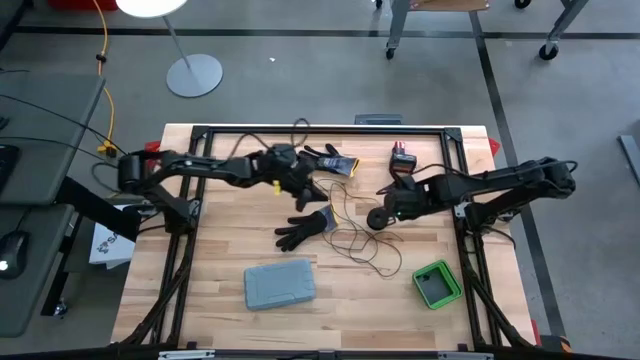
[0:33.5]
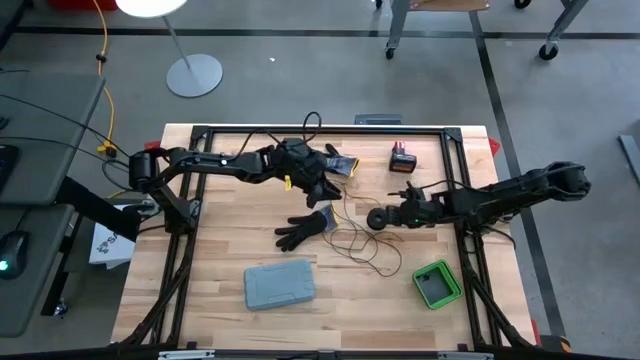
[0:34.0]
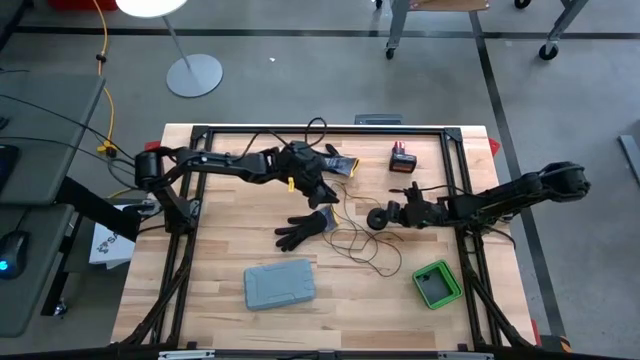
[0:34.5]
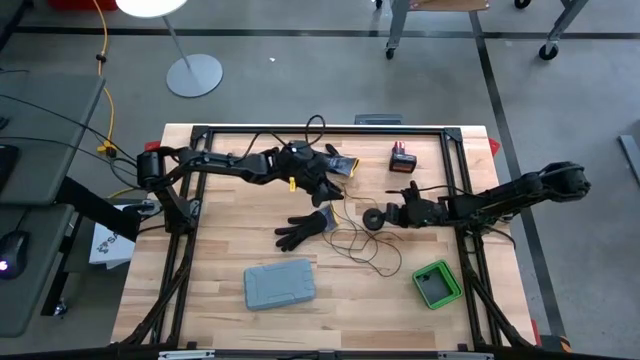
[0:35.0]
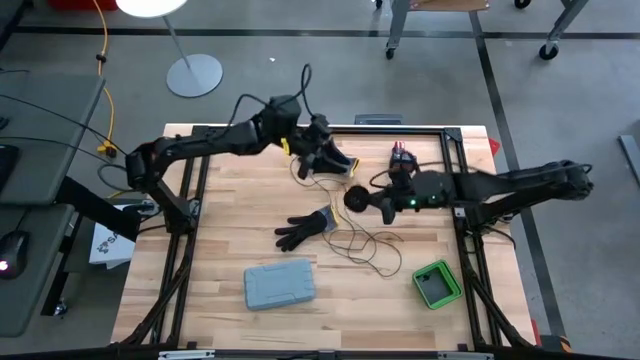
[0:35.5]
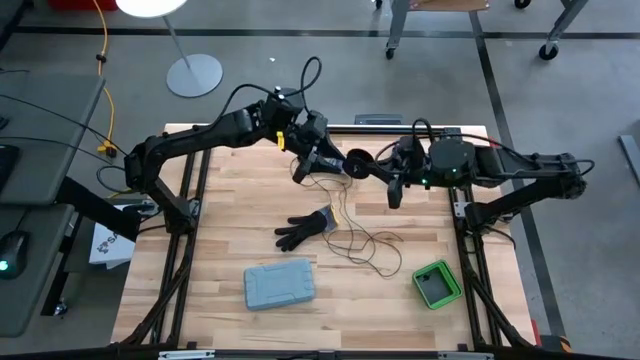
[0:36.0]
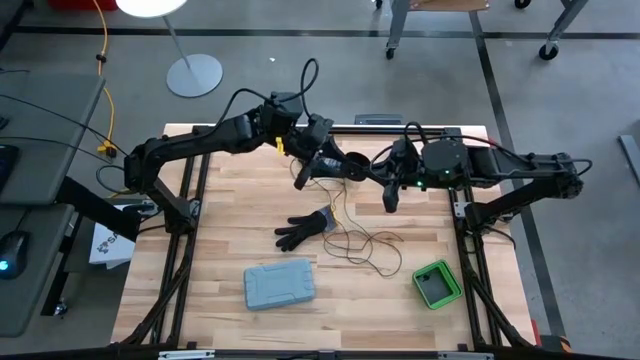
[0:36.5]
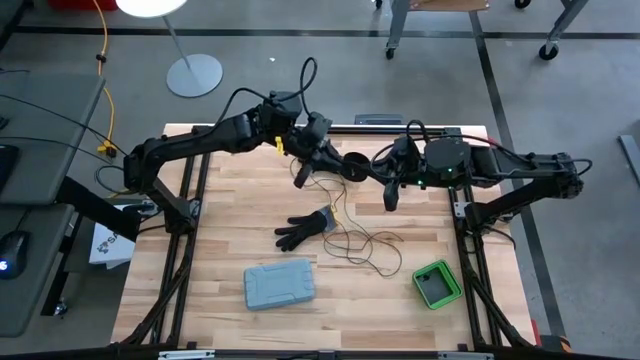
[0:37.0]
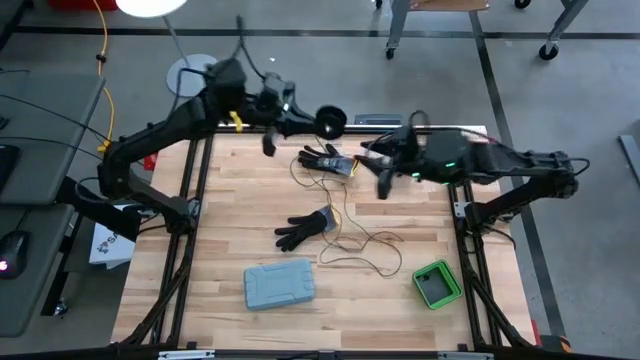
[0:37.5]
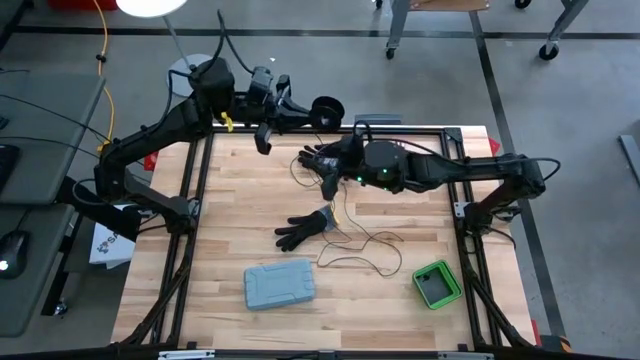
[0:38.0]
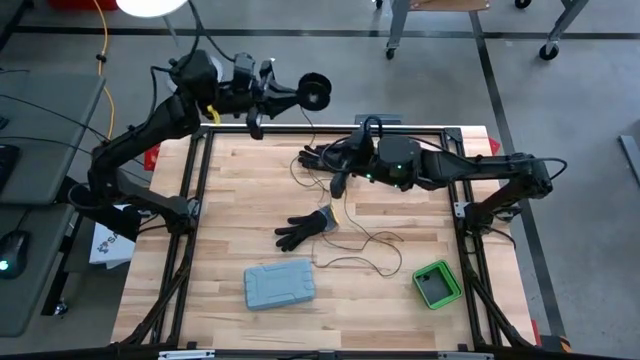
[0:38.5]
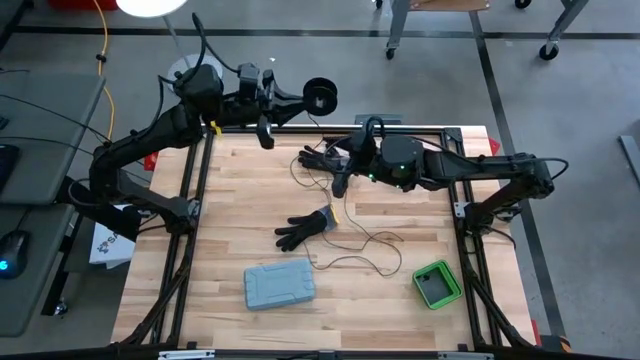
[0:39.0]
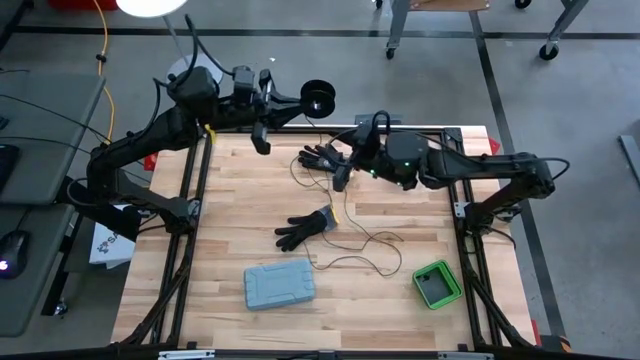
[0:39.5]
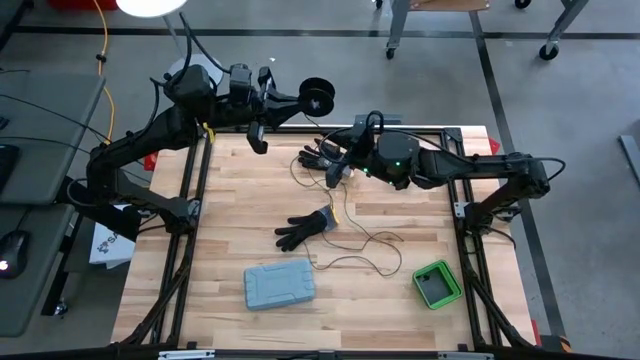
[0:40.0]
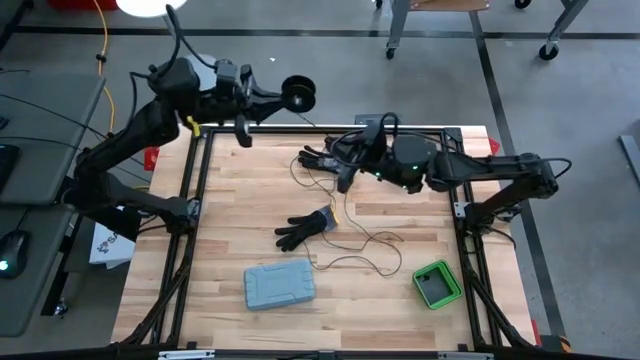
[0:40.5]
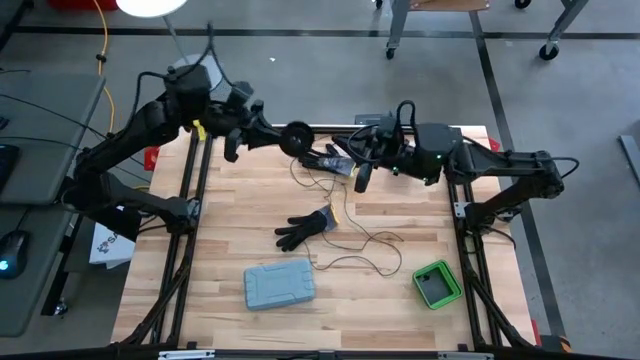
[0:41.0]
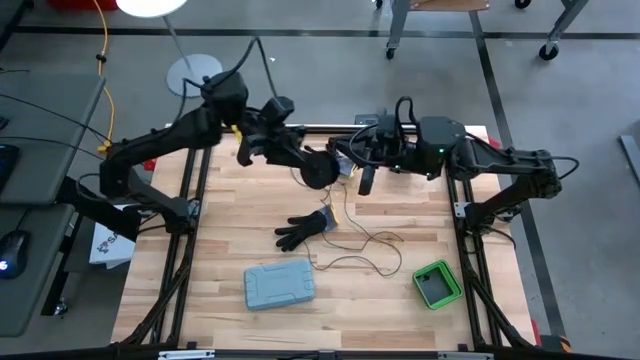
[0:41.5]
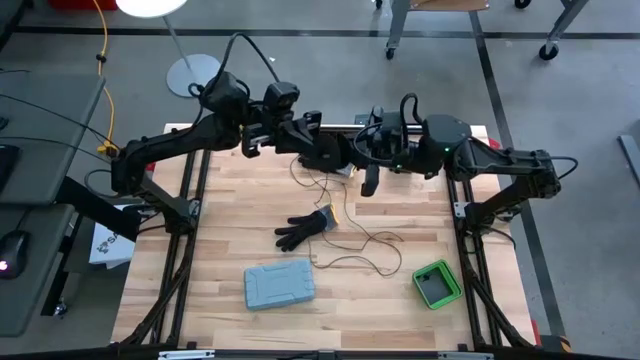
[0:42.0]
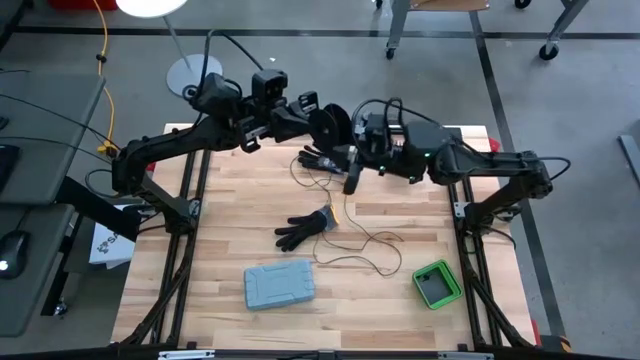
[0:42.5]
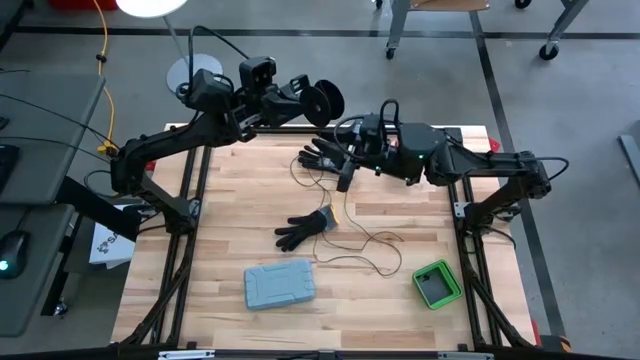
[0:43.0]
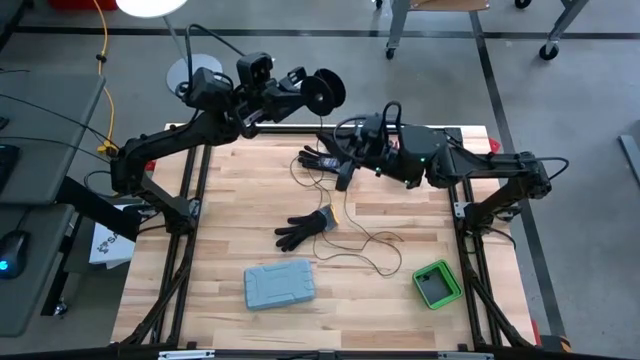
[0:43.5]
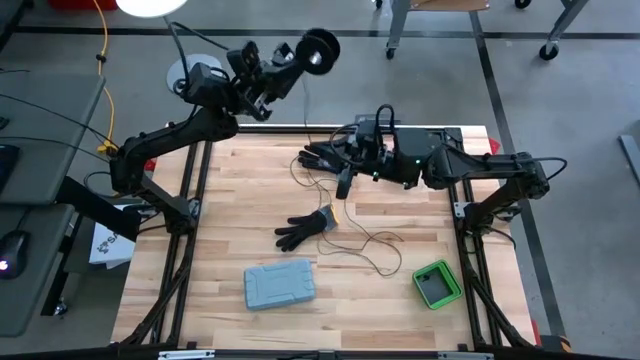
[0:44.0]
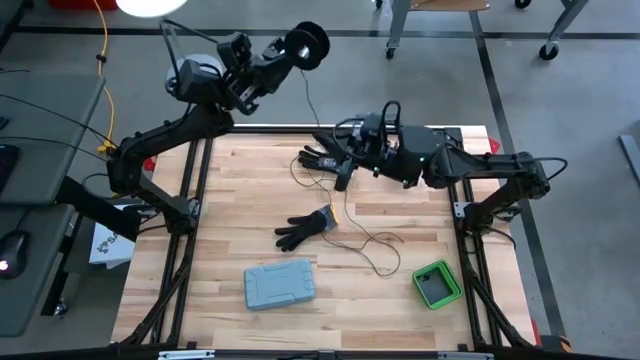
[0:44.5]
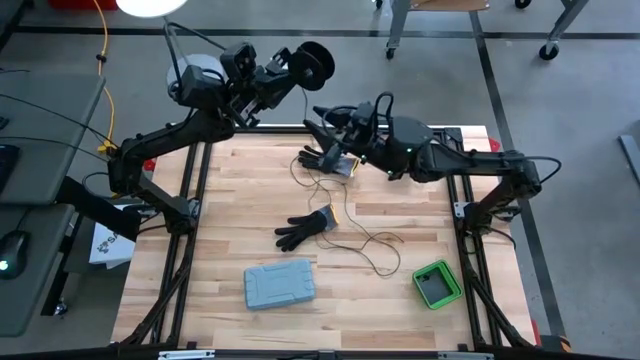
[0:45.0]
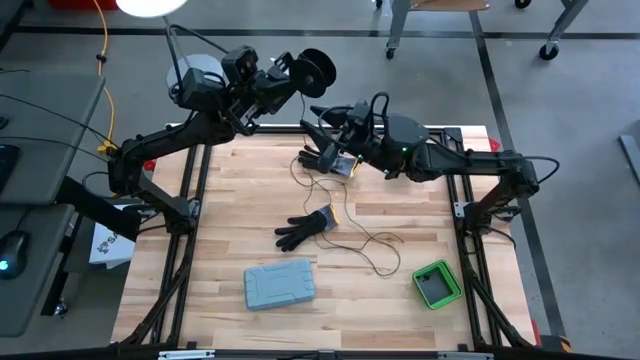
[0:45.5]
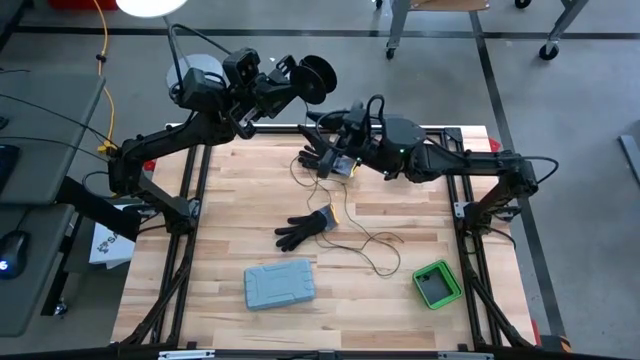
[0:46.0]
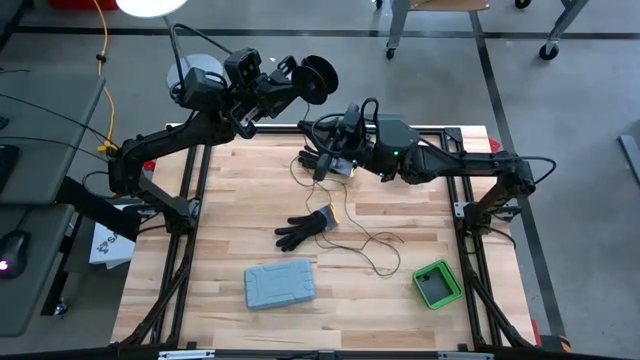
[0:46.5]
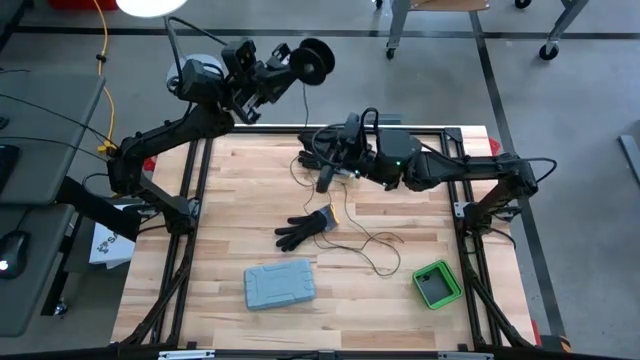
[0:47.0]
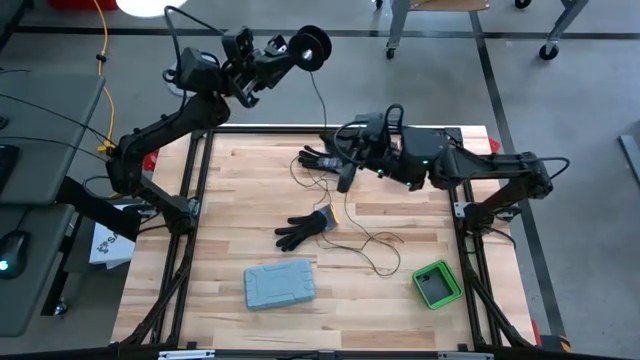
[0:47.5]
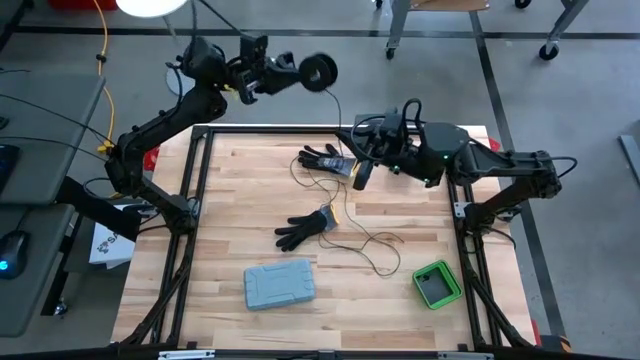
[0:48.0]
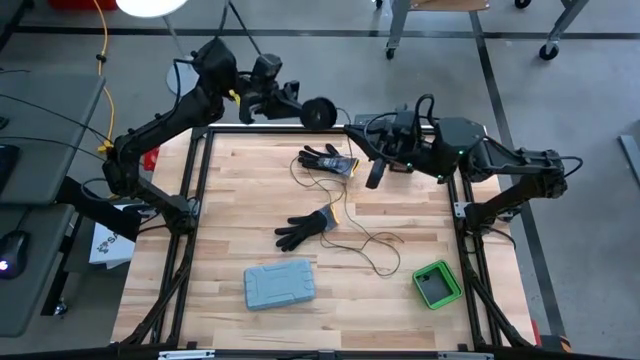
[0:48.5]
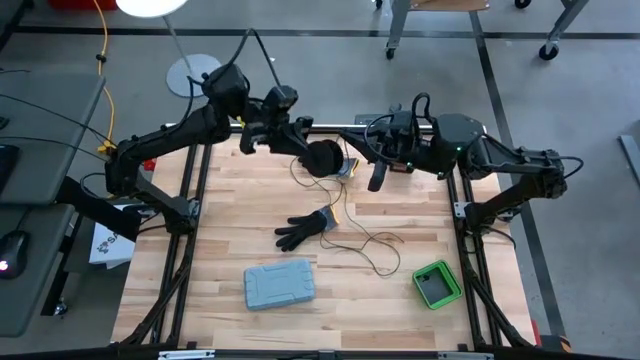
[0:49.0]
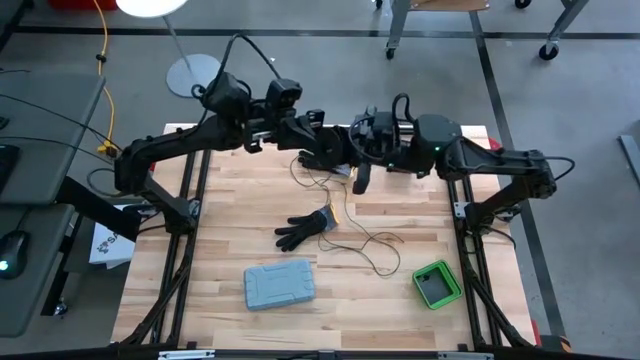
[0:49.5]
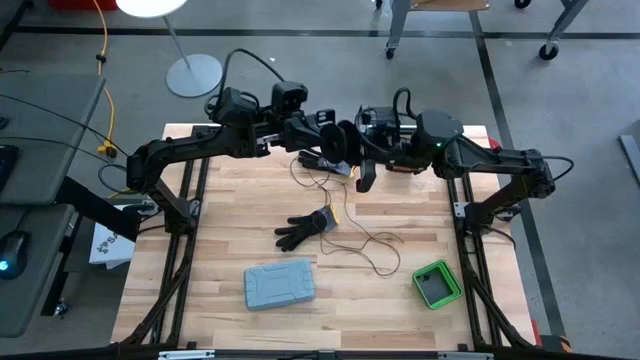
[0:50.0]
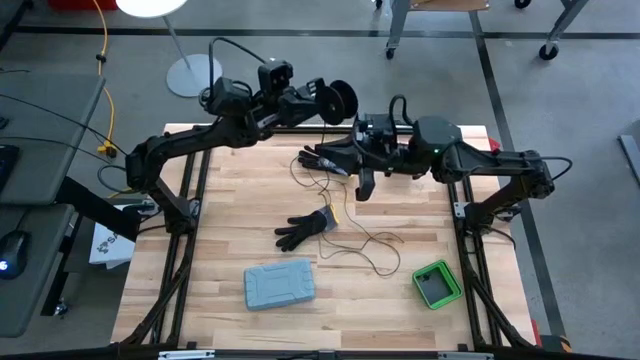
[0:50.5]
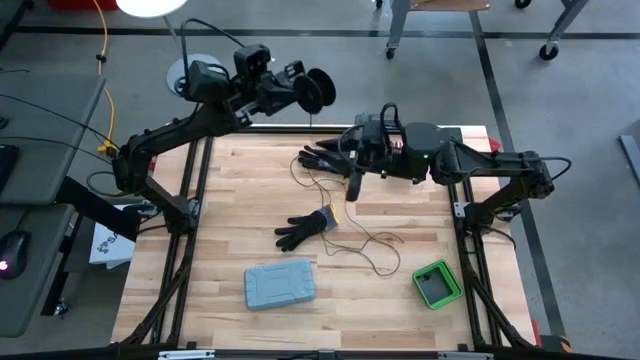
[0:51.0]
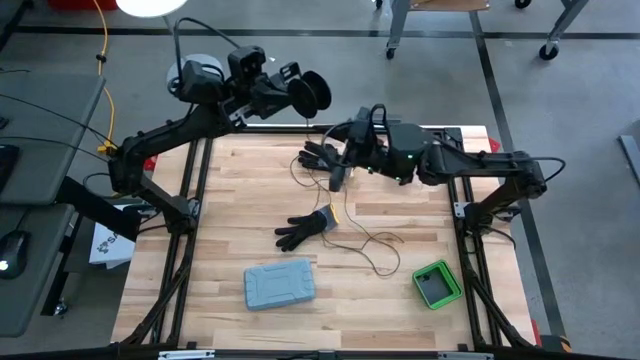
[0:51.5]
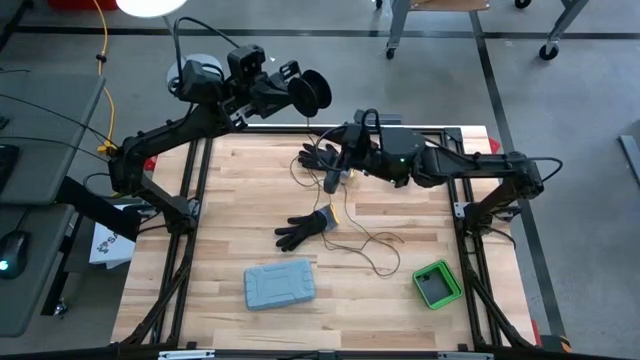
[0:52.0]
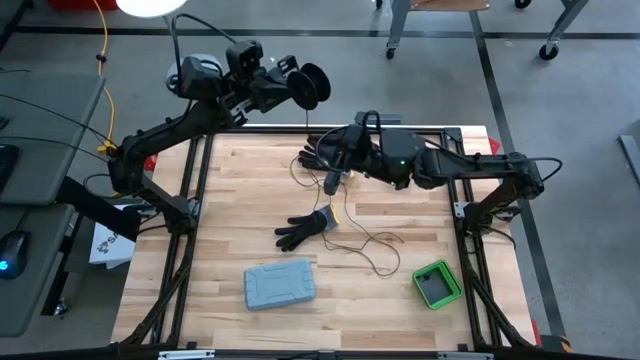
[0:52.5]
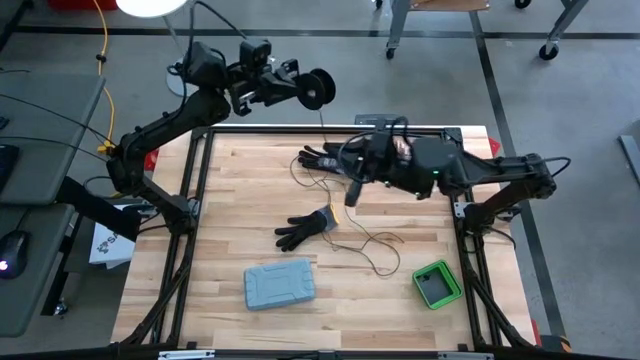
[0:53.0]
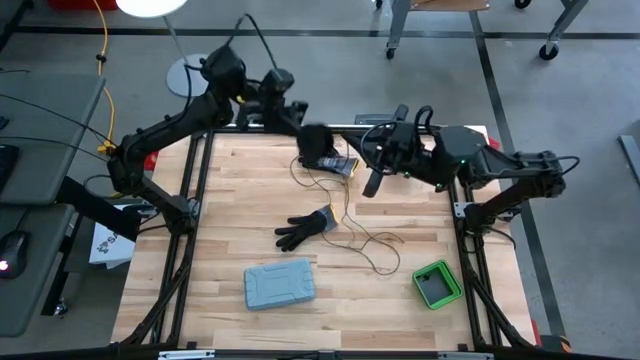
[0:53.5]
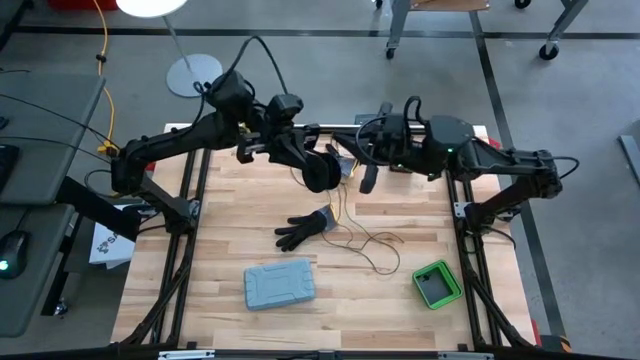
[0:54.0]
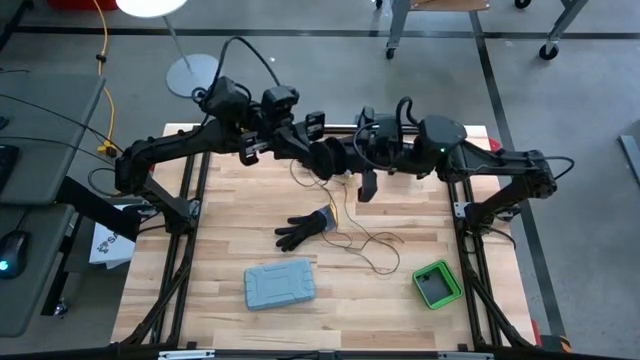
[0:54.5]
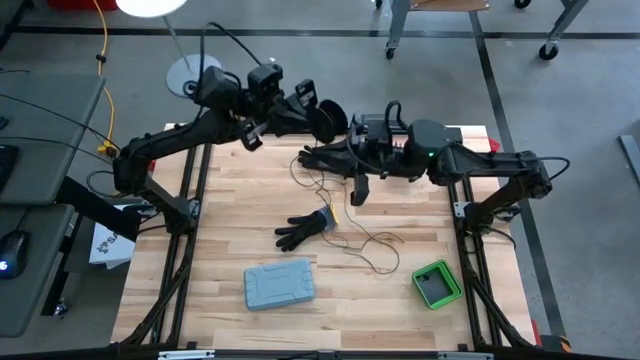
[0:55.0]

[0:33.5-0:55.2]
Task: Coil cords
Coil the black wire cable onto the black spool
